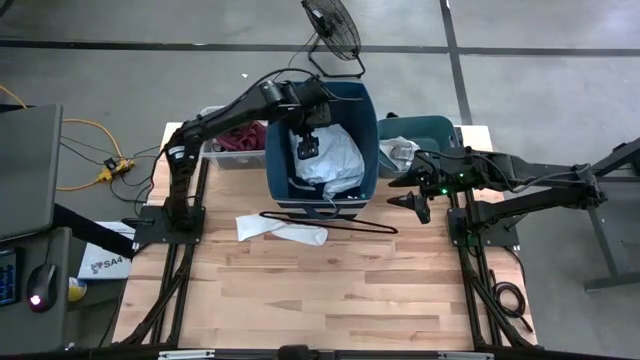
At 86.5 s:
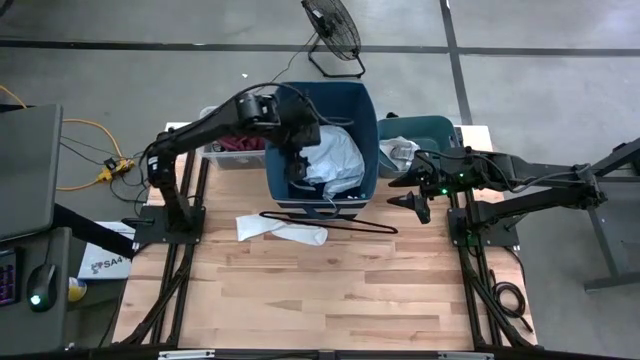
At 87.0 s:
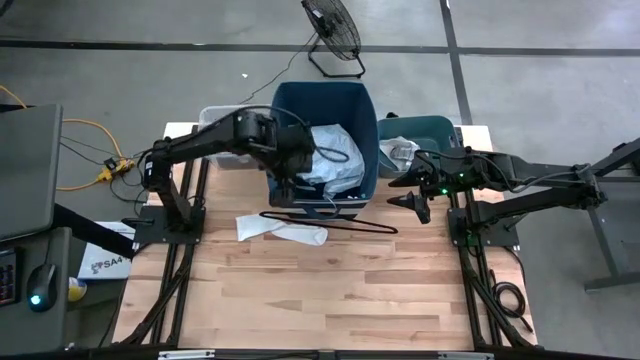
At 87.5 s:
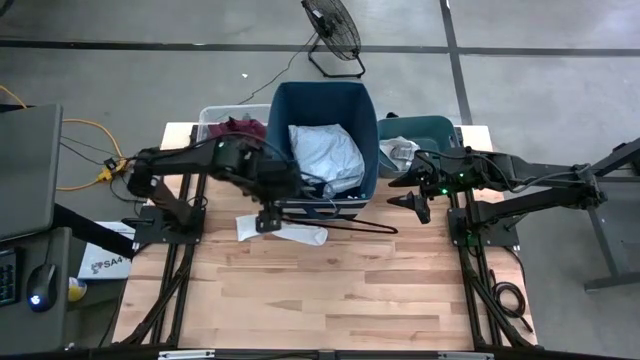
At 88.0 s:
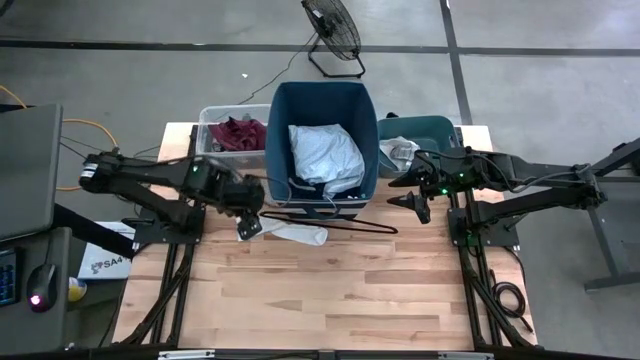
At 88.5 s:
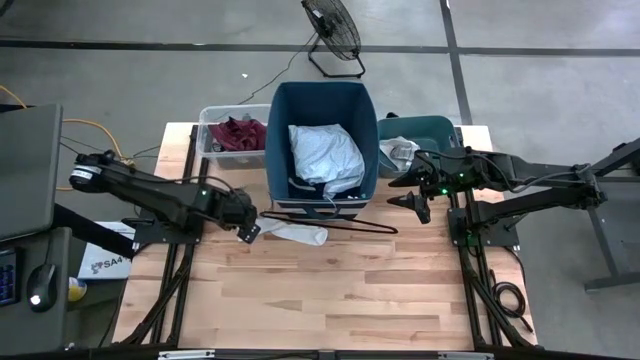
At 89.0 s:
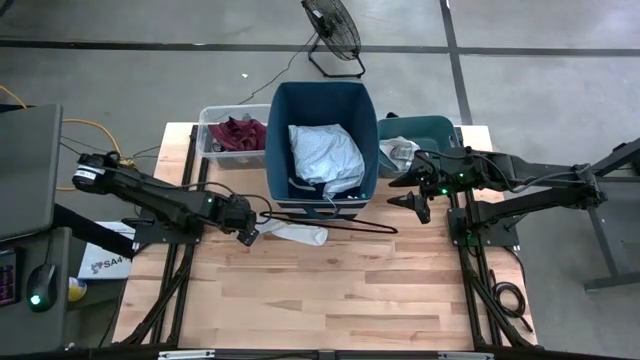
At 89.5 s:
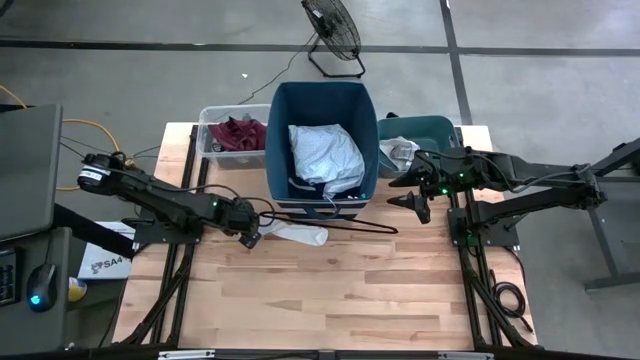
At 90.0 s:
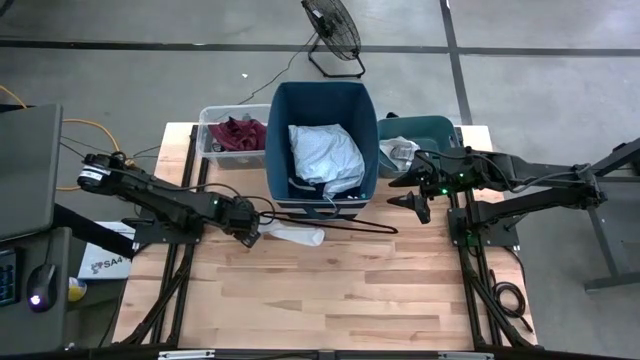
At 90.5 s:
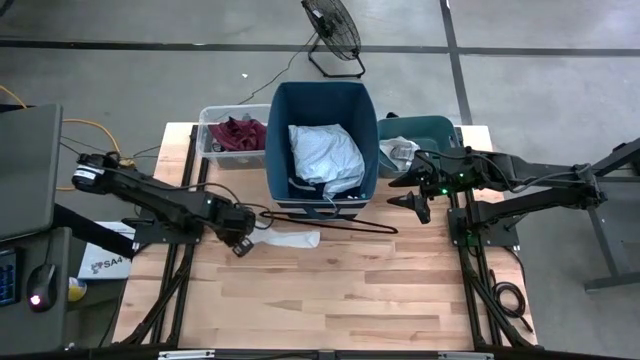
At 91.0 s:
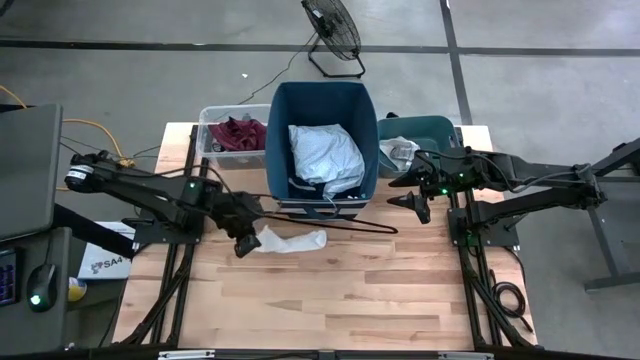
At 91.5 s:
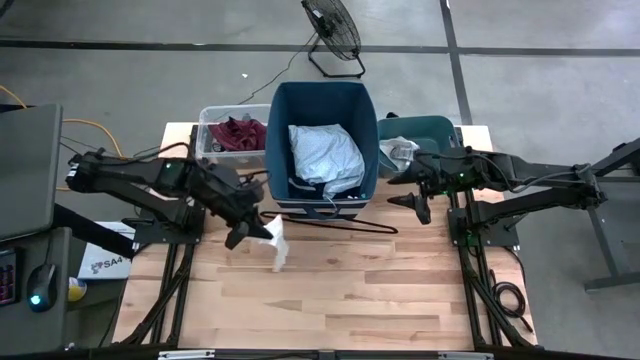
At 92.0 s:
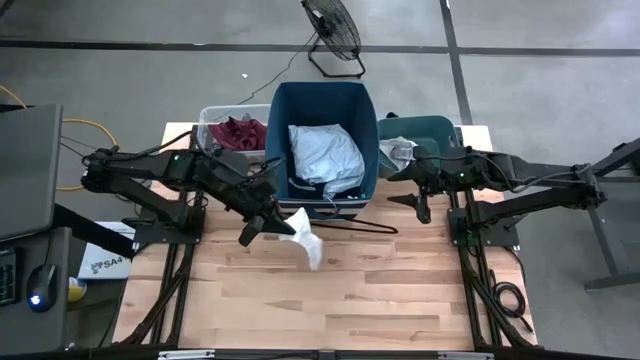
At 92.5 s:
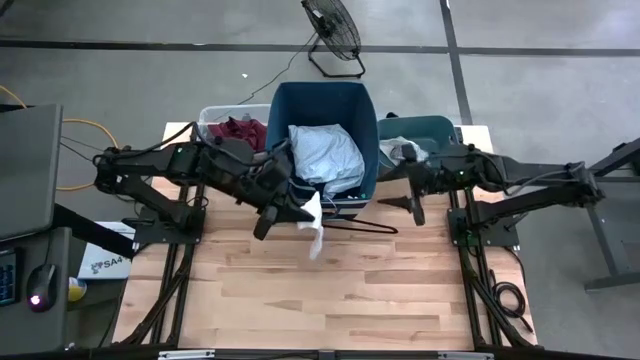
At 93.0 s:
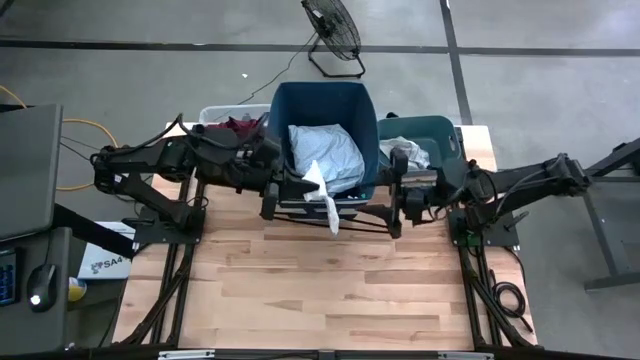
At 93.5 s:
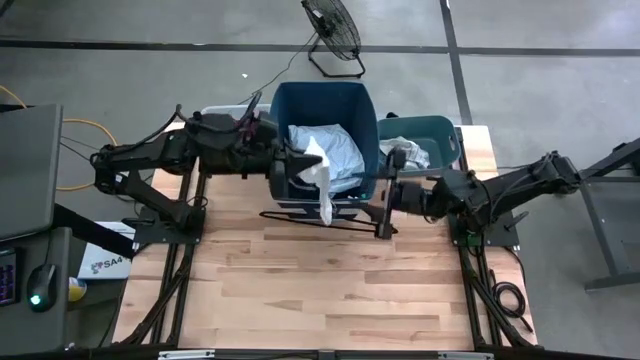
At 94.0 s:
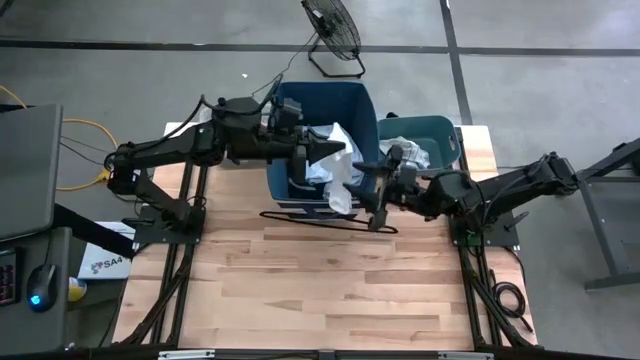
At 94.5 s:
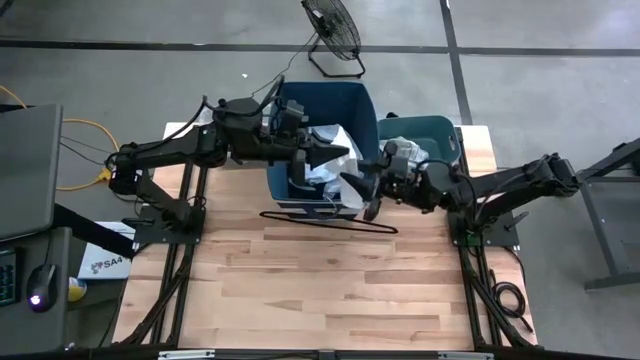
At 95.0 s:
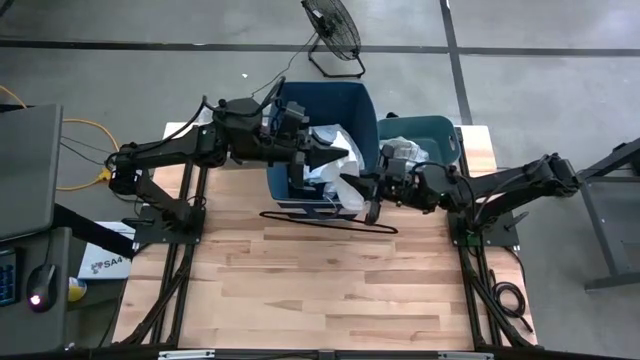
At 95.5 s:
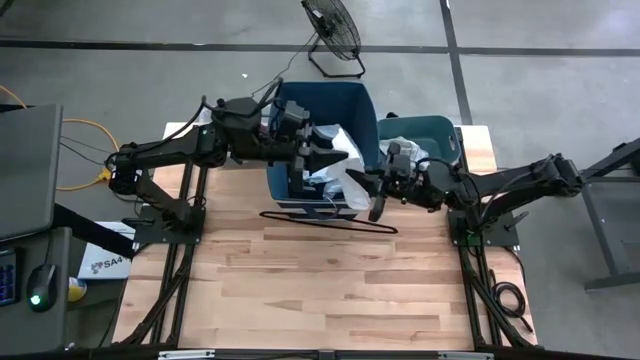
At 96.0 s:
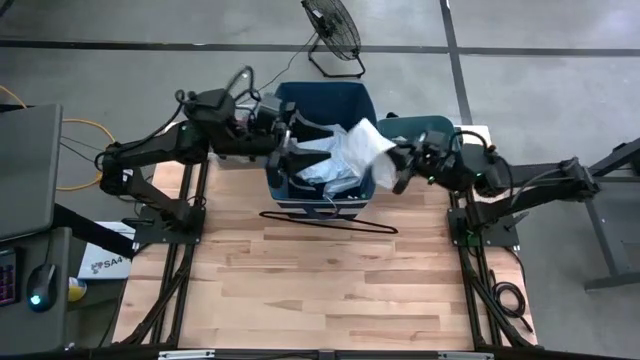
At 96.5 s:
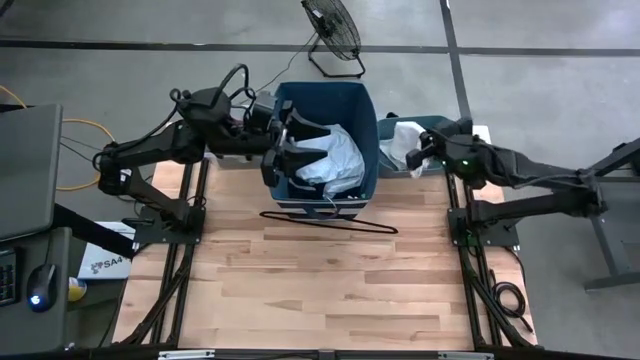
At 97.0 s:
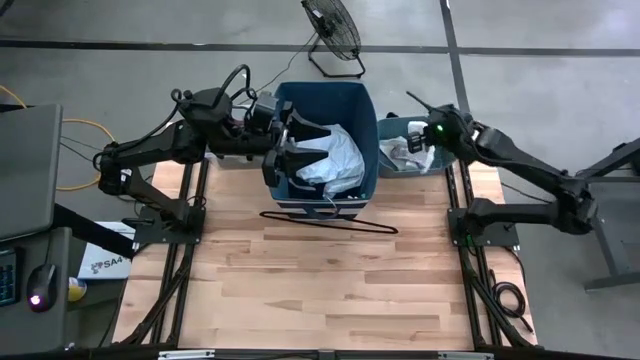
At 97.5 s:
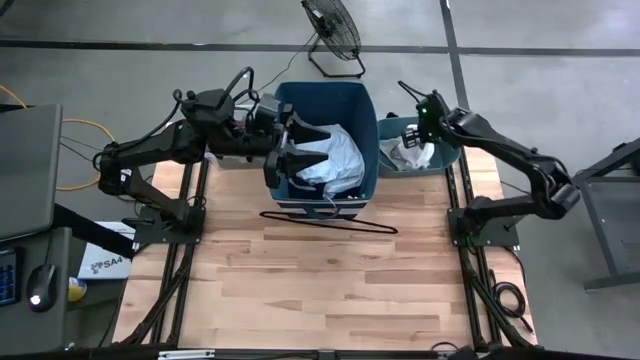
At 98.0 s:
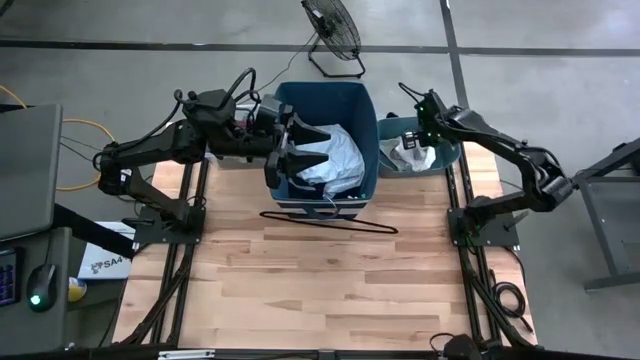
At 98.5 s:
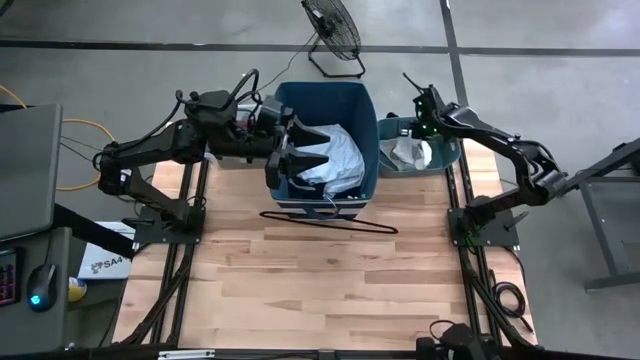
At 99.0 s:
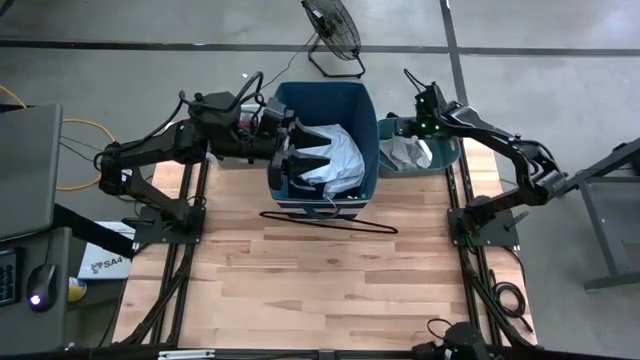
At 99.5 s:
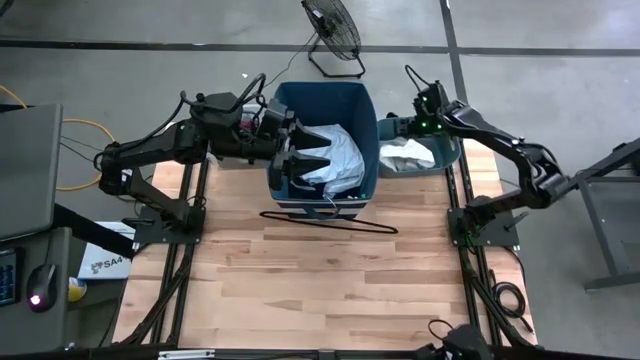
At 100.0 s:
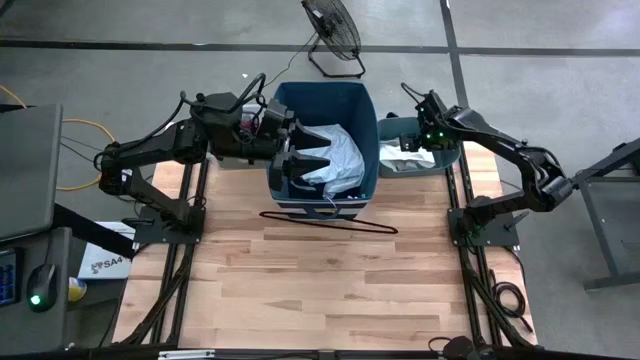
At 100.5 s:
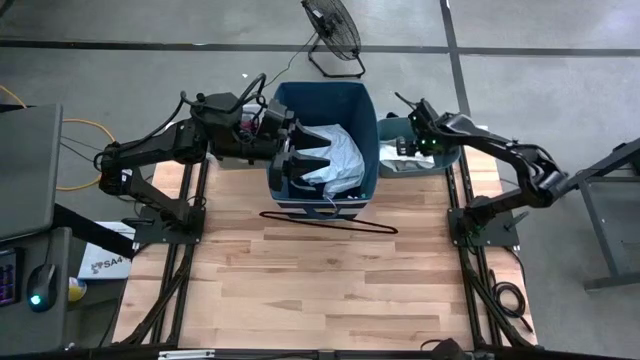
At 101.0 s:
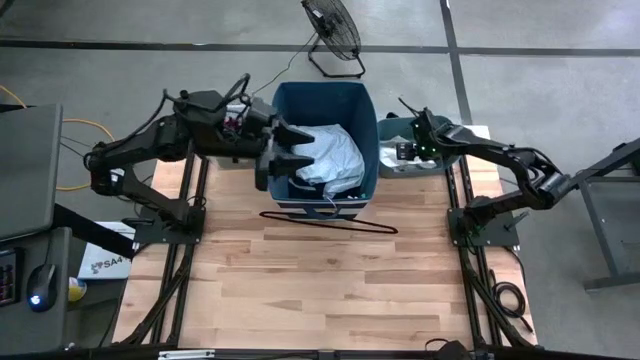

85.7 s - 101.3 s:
Task: Pick & Place Cloths
Put the white sock into the green bin

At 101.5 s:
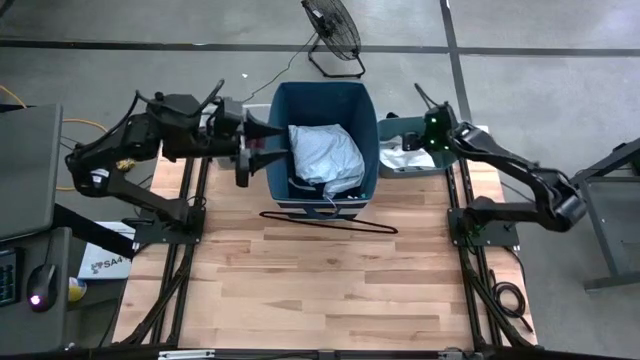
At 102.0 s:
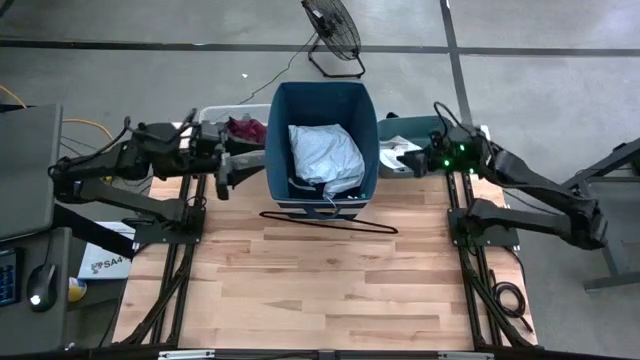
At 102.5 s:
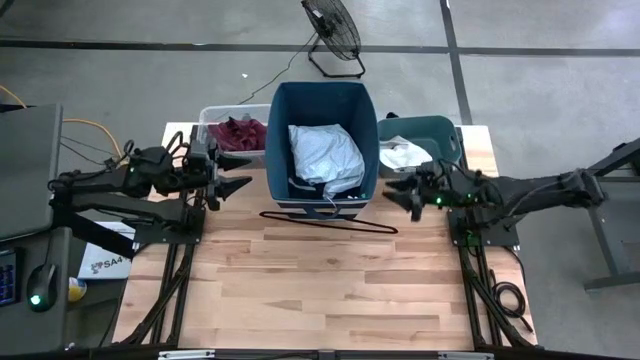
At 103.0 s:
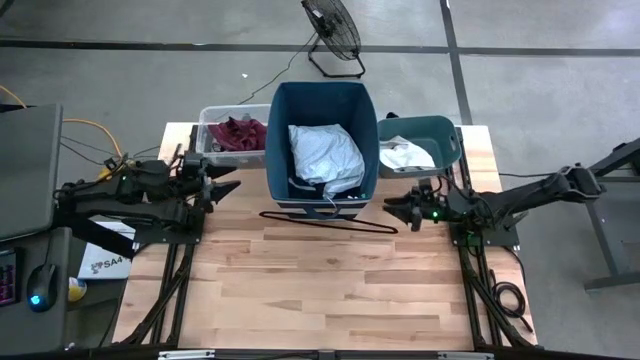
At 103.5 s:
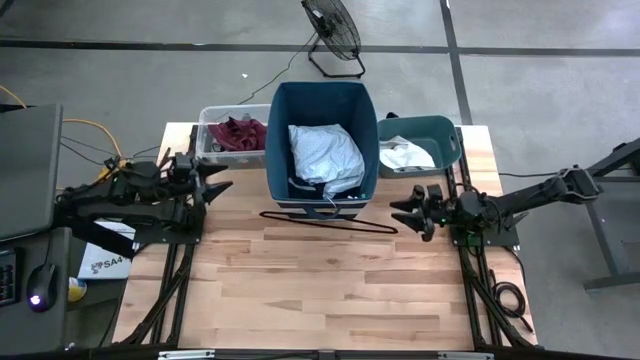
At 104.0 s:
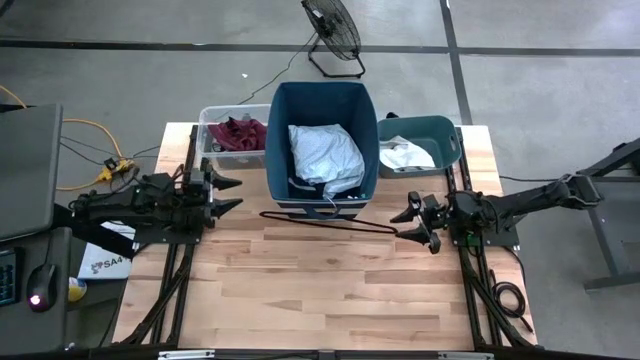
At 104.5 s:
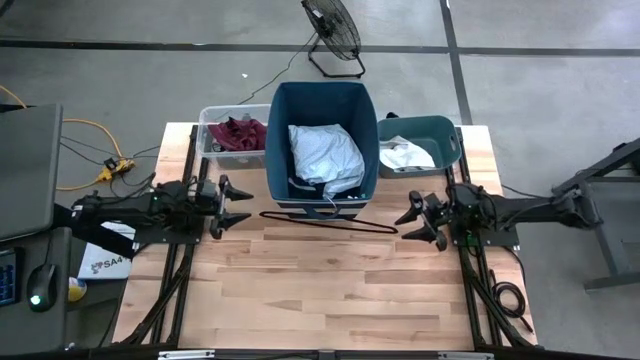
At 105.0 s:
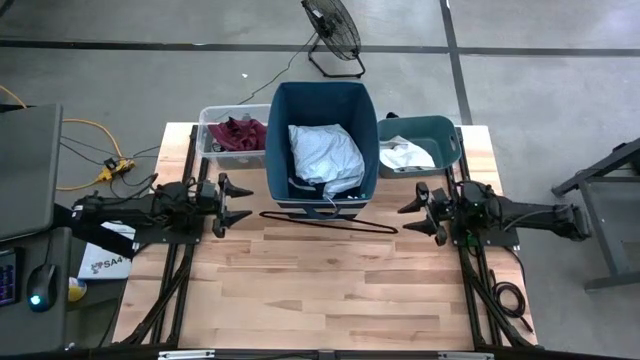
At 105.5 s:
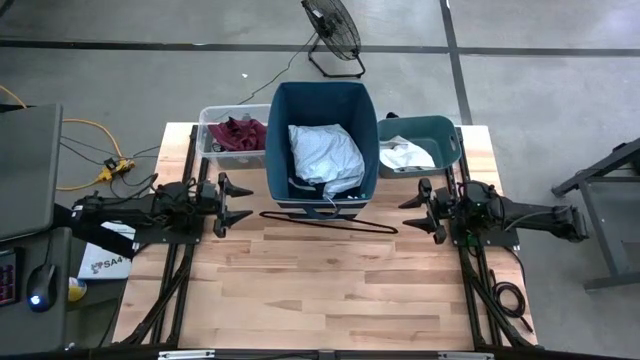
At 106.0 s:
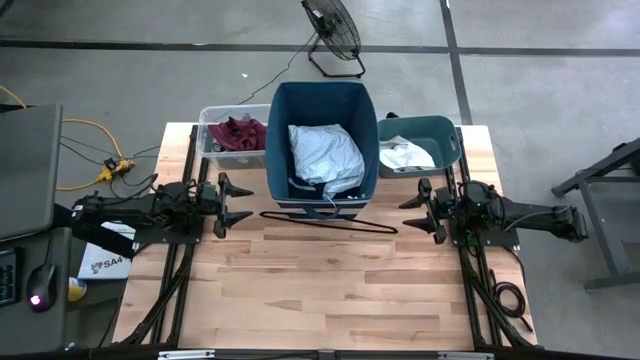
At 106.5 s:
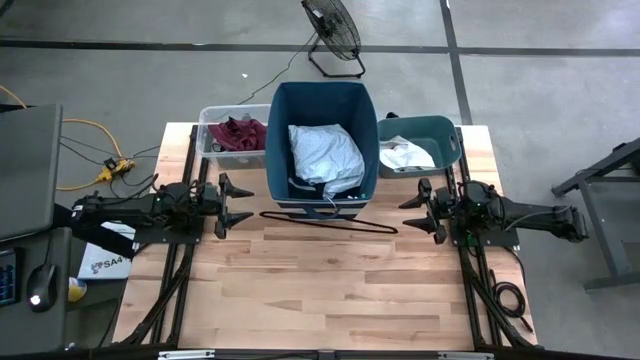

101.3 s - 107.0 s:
Return to Home Position
